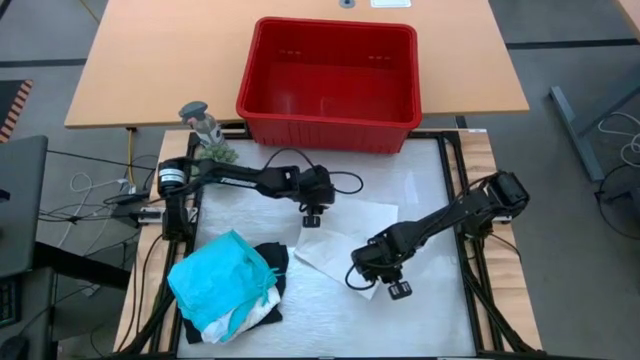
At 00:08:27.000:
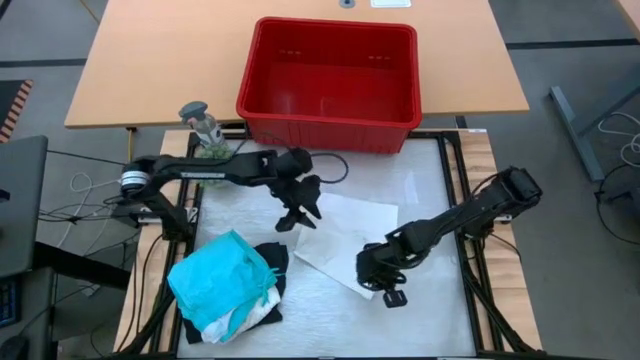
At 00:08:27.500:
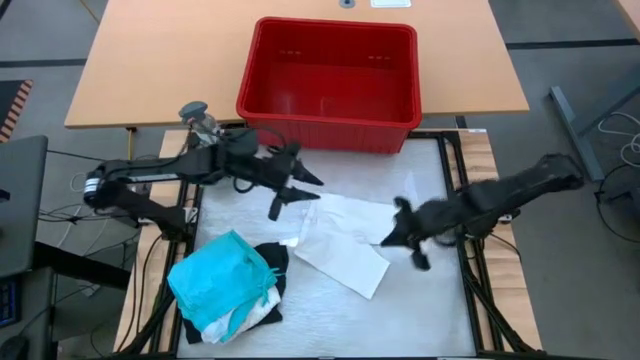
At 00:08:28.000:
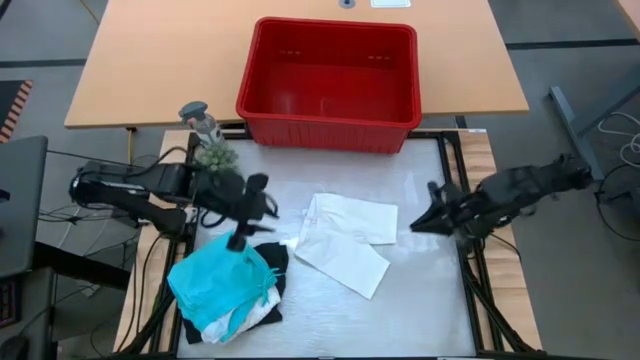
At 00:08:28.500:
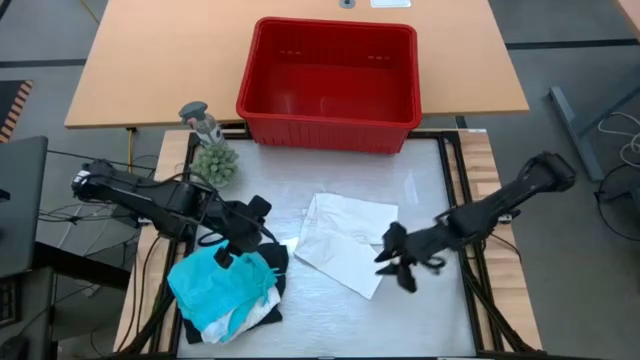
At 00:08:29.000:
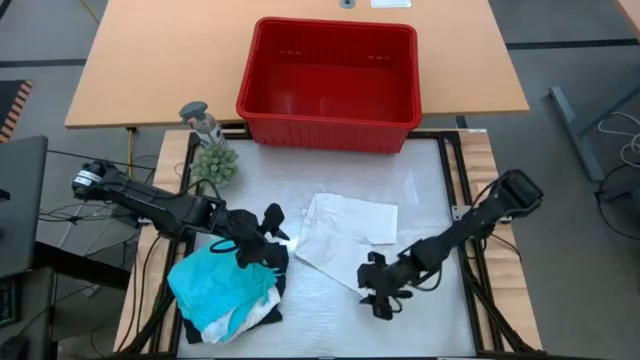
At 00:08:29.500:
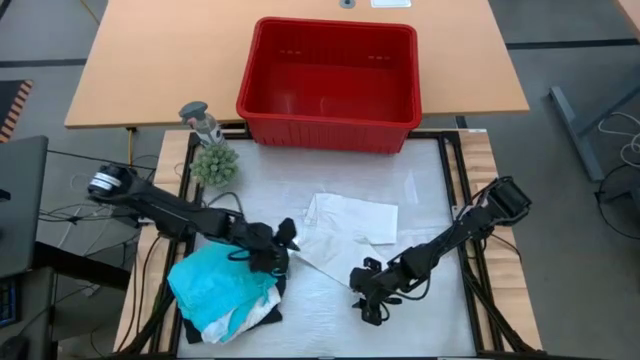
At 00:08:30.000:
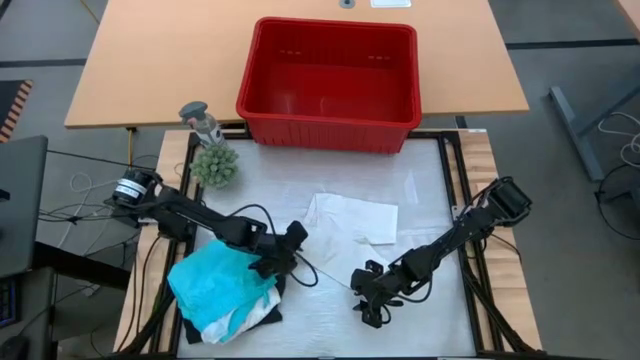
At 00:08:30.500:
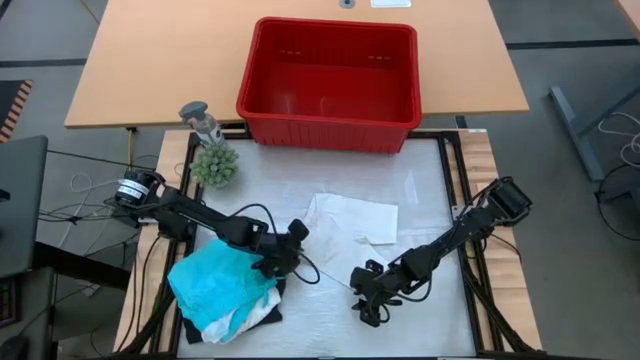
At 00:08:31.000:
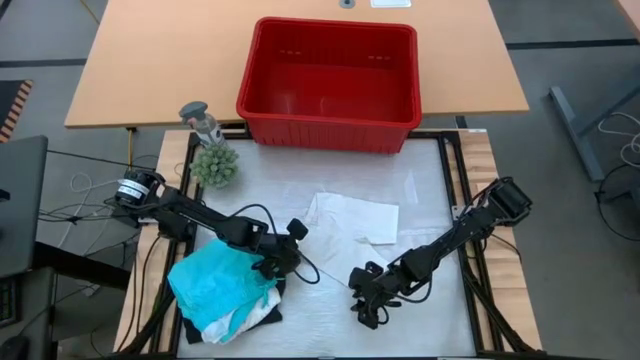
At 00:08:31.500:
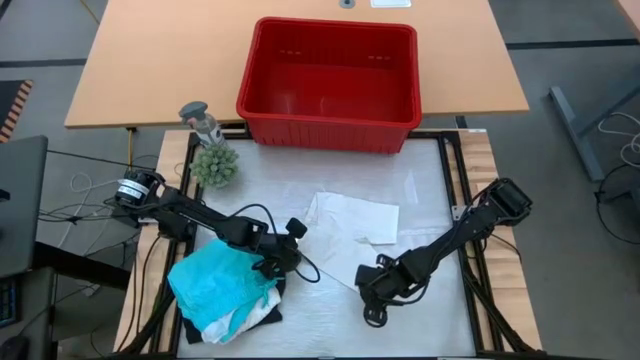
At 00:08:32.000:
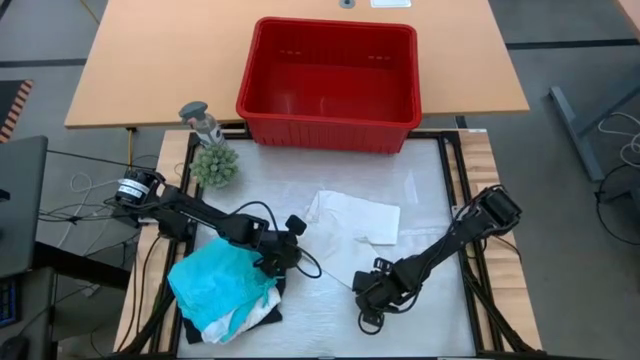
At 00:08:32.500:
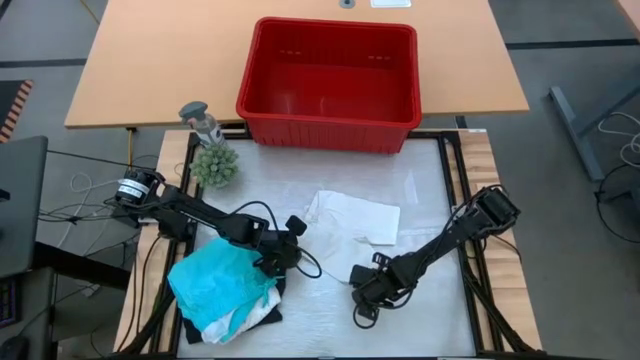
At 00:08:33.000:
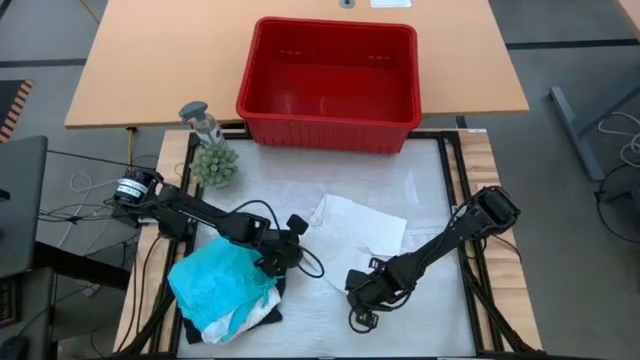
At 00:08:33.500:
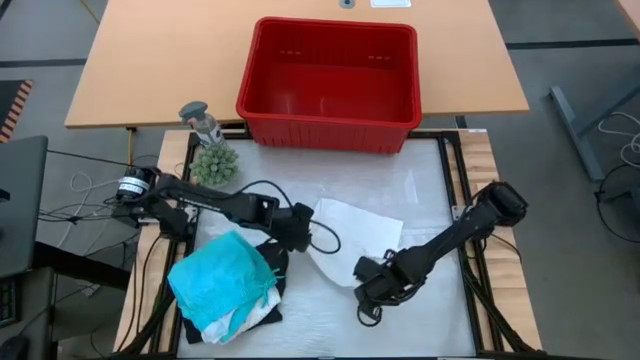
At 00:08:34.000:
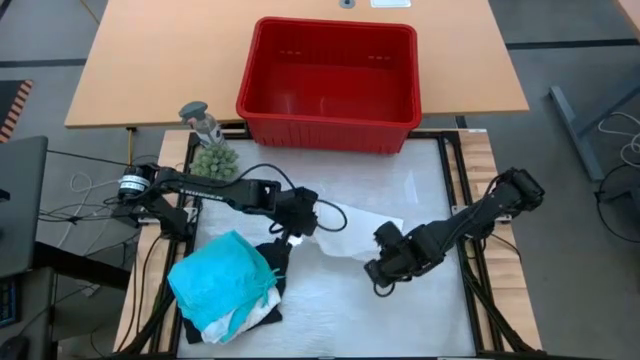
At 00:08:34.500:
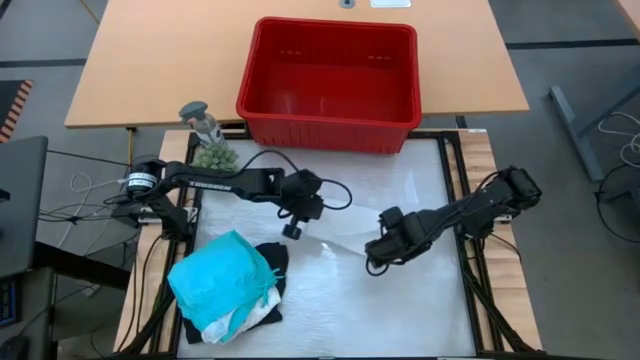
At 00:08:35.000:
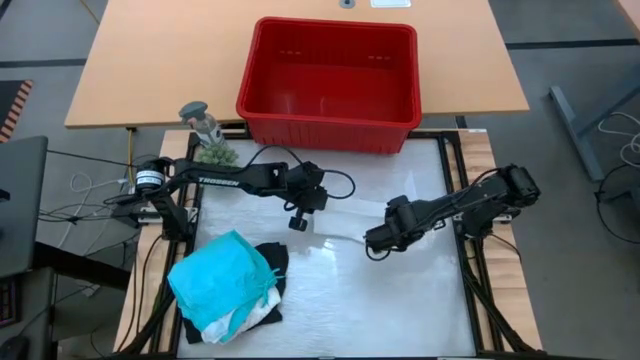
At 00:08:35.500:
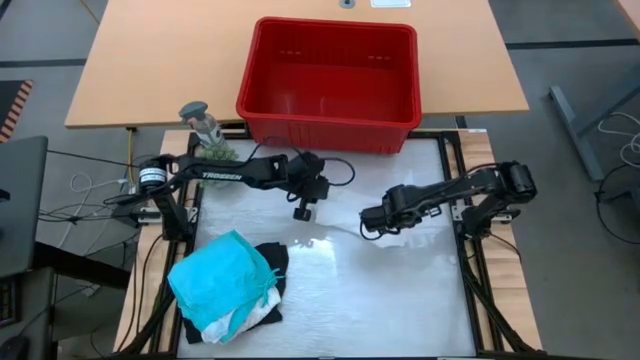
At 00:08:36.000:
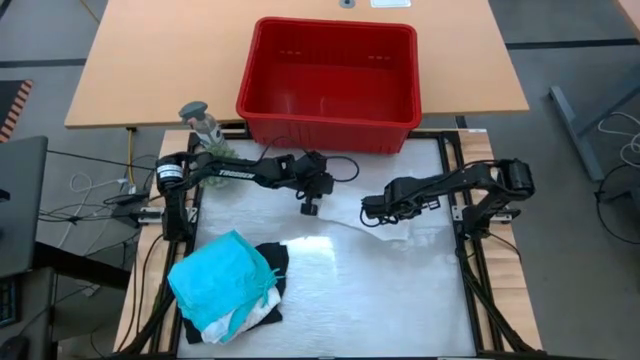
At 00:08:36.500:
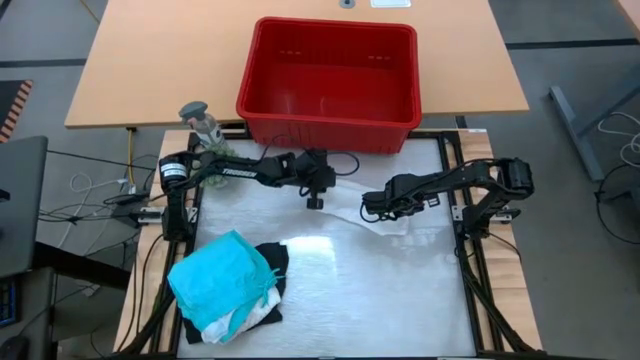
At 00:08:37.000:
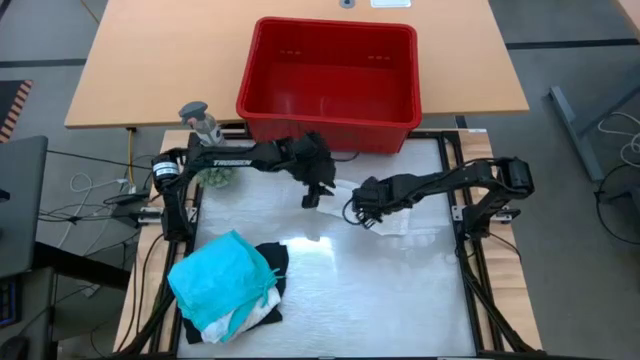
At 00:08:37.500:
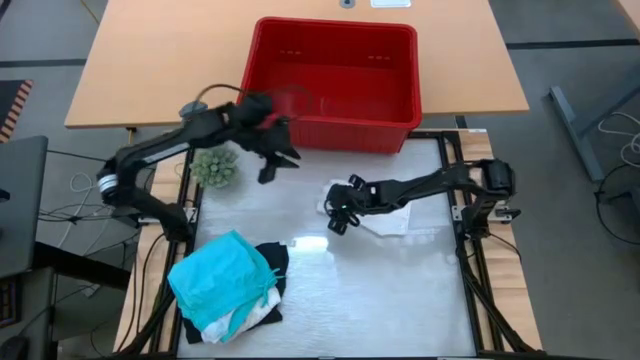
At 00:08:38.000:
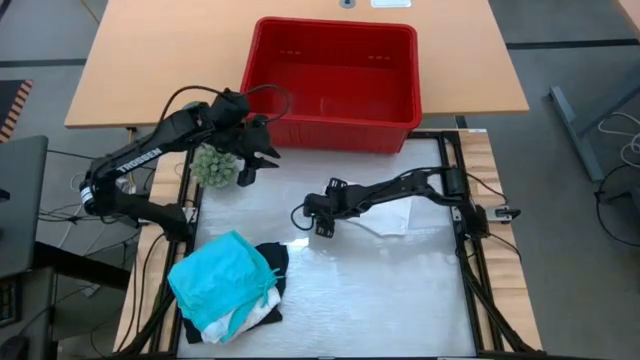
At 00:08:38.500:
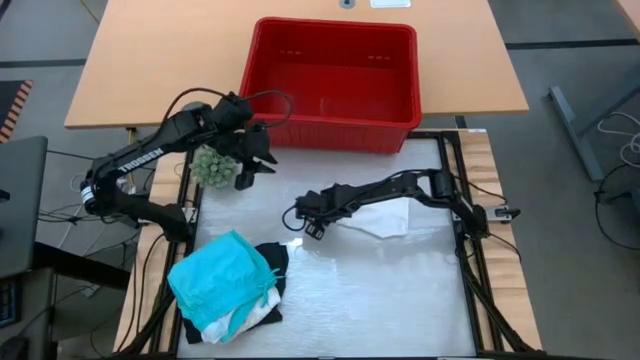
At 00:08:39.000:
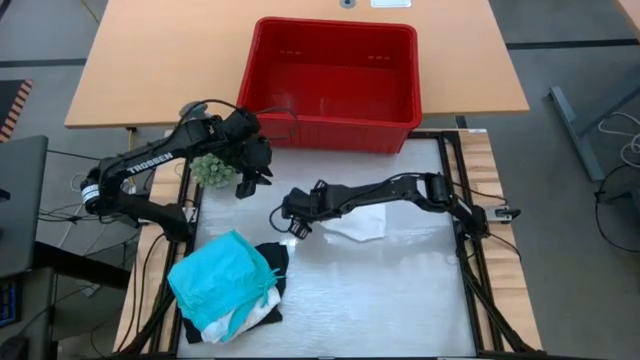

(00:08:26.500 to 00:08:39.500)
Task: Fold Laundry from Bin
Fold the white shorts

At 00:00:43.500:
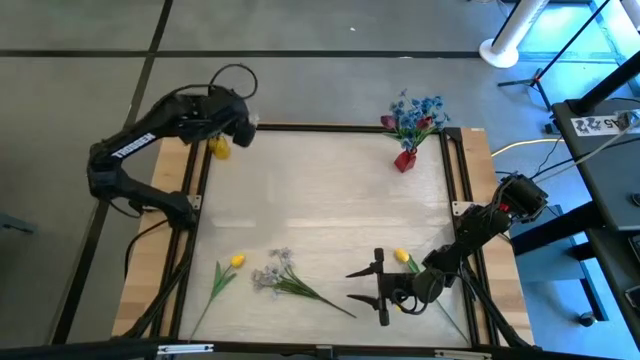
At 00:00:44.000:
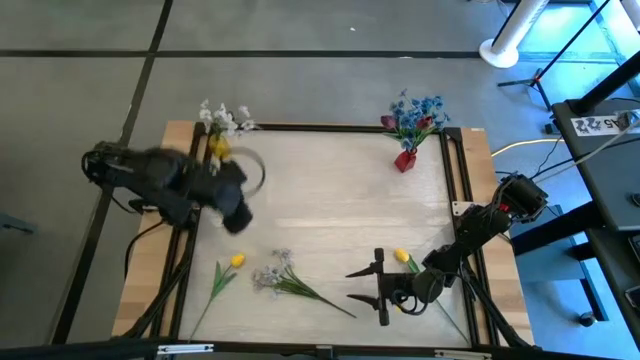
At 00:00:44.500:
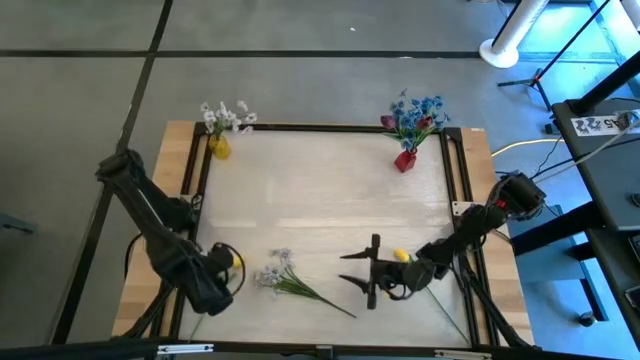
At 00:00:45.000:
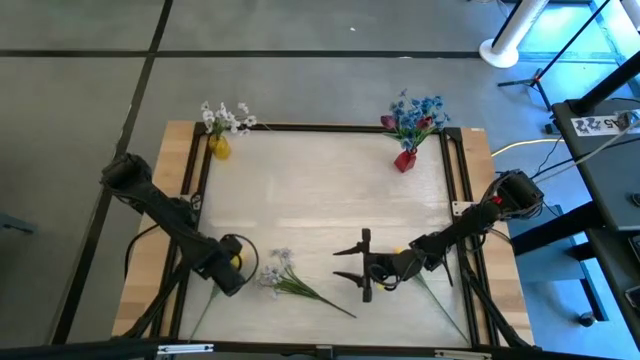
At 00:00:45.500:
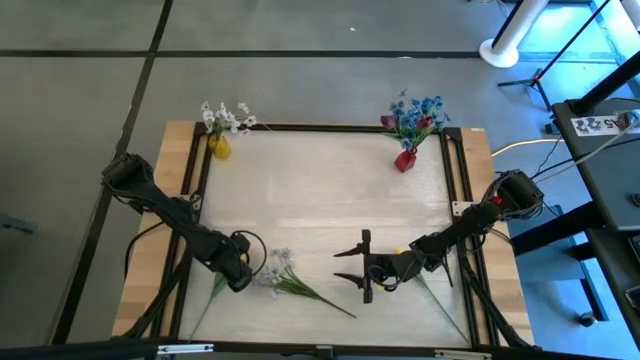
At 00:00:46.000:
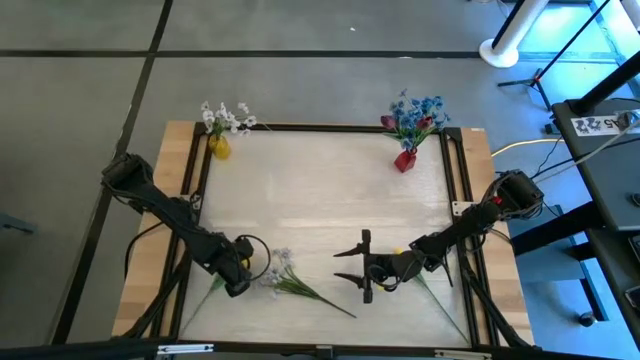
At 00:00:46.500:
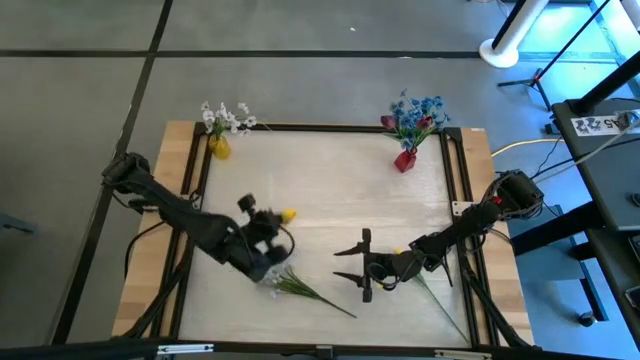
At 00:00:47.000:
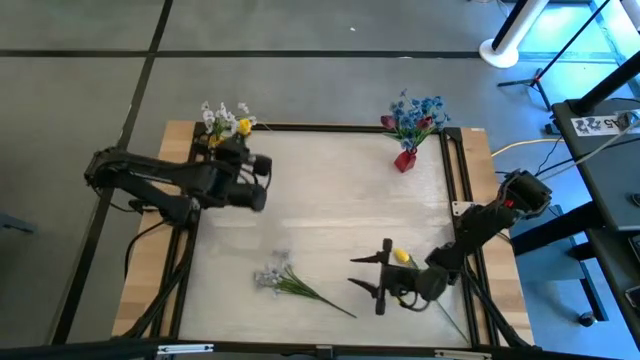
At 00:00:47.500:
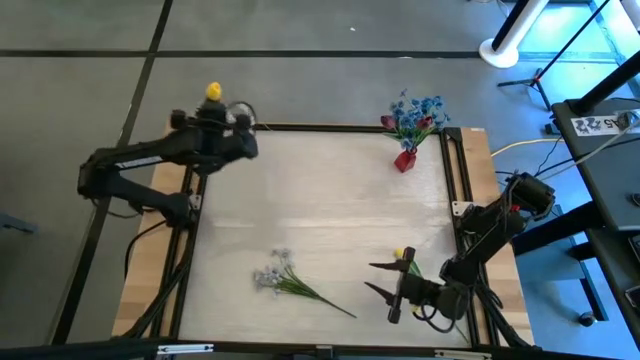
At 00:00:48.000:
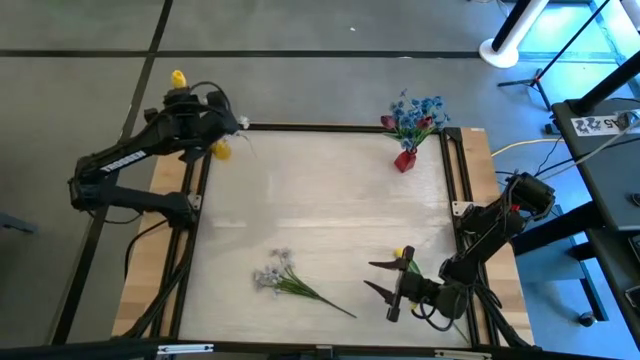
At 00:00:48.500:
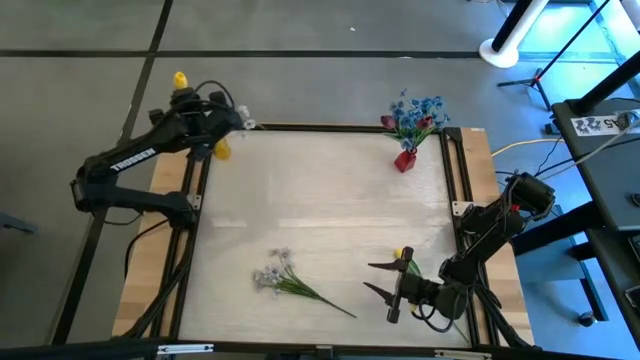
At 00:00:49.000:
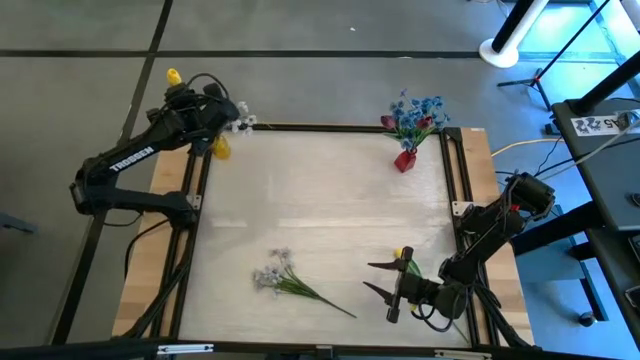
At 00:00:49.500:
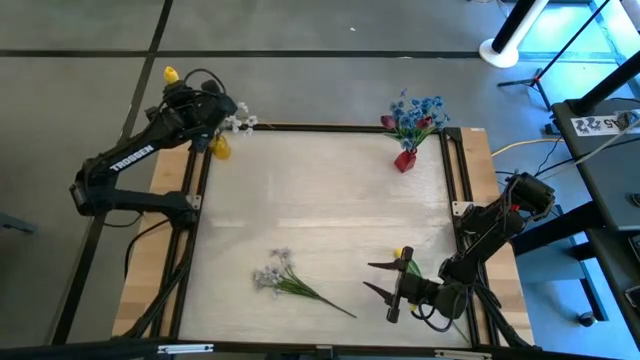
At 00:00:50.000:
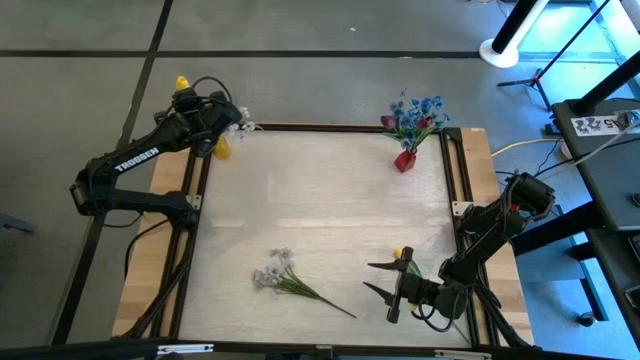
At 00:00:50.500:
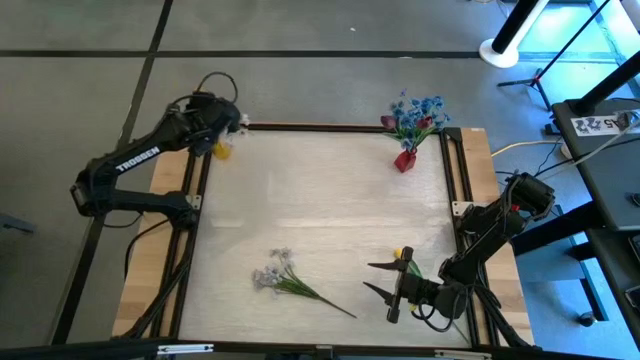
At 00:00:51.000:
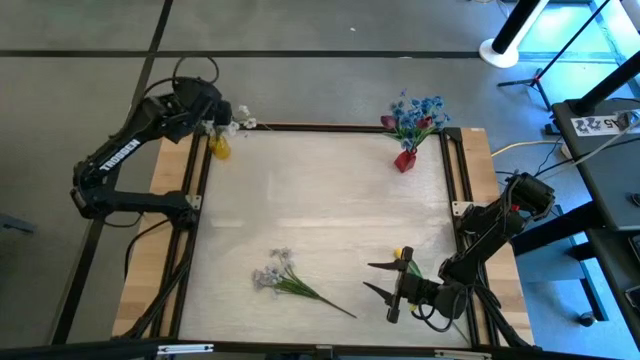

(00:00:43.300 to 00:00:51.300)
Task: Sort flowers into vase by color
Put the left yellow flower into the yellow vase
